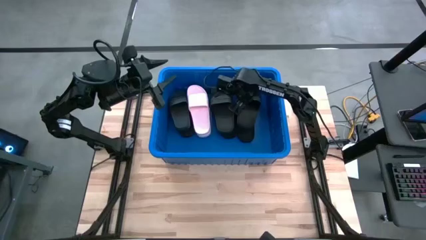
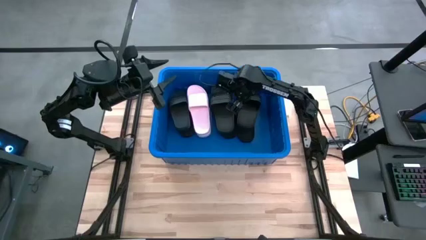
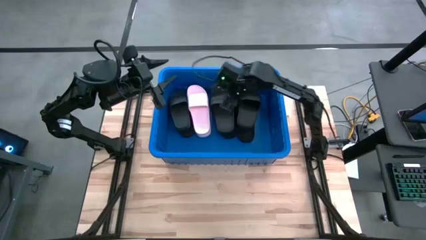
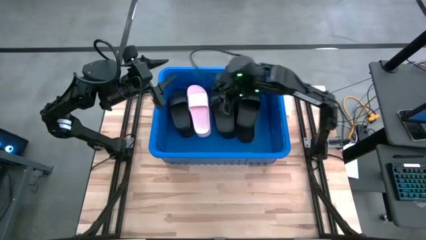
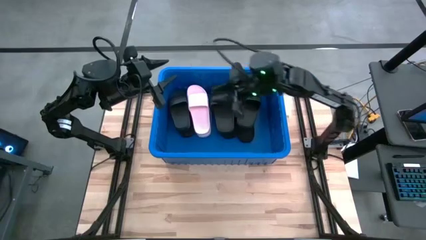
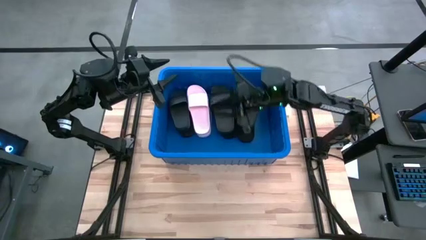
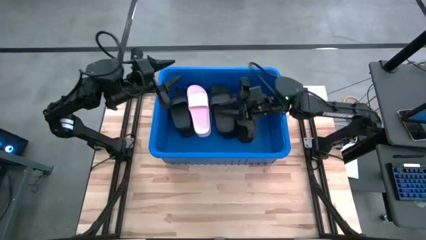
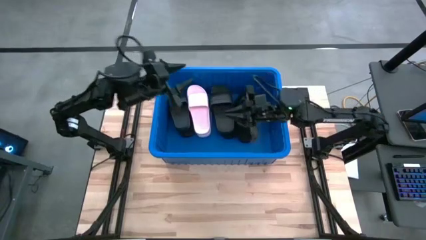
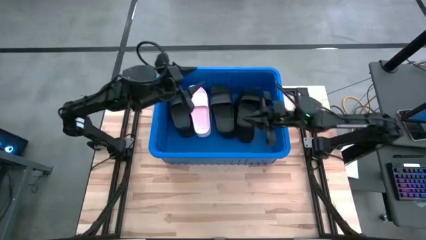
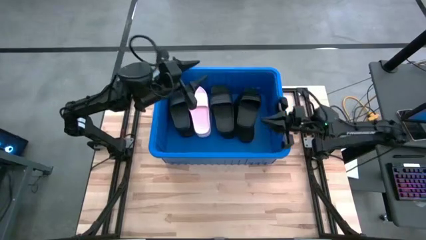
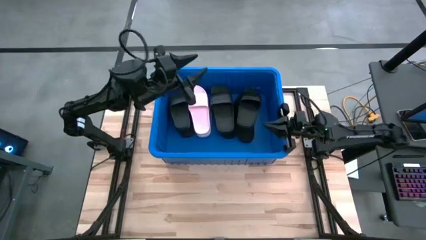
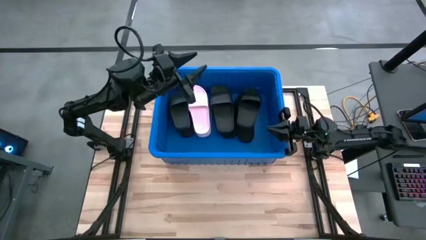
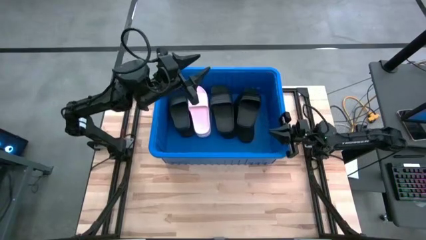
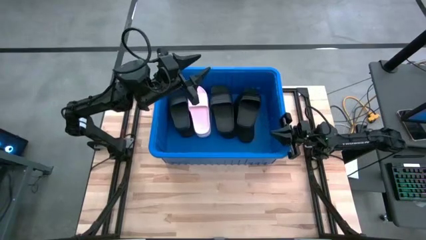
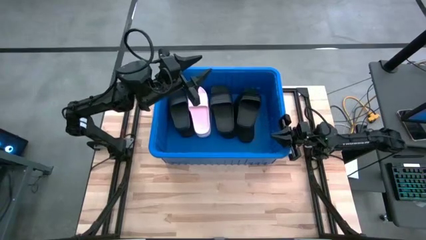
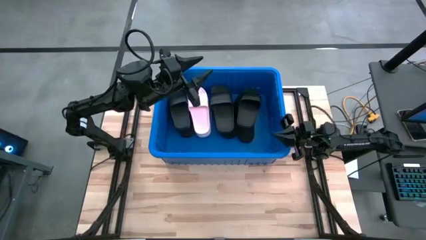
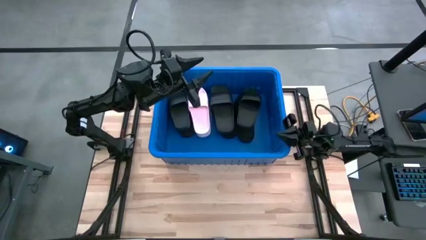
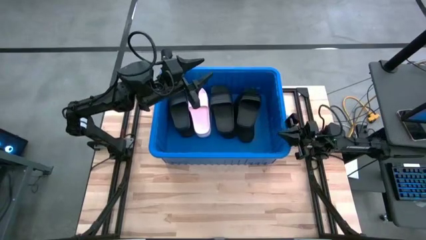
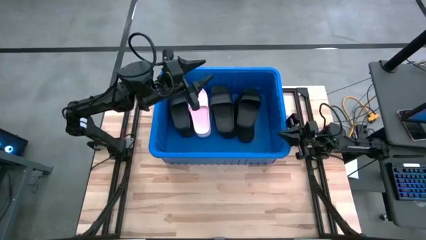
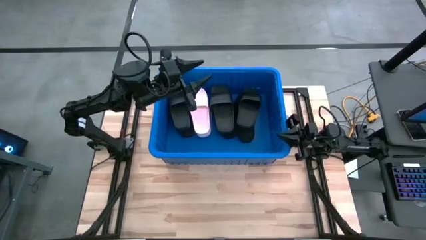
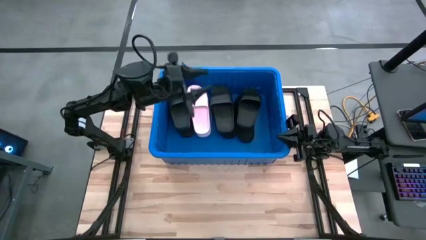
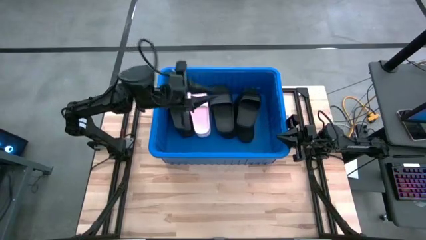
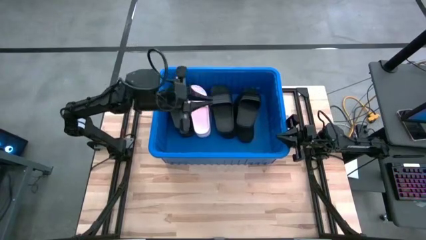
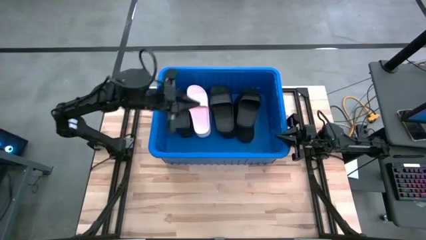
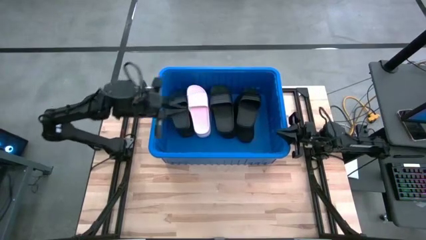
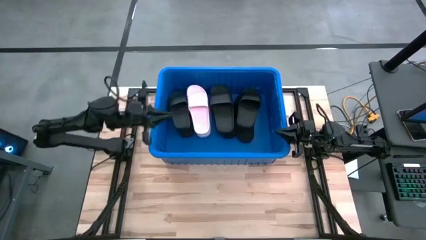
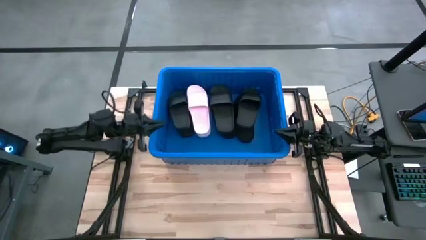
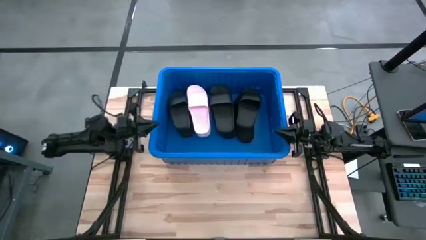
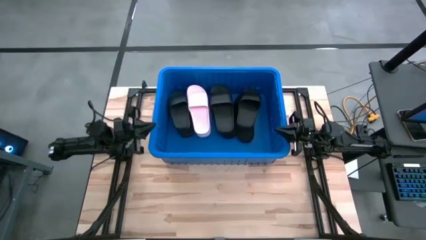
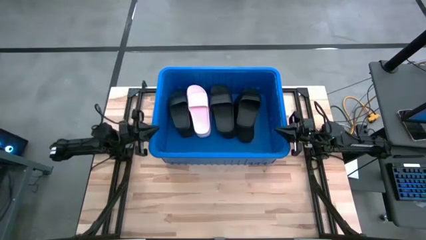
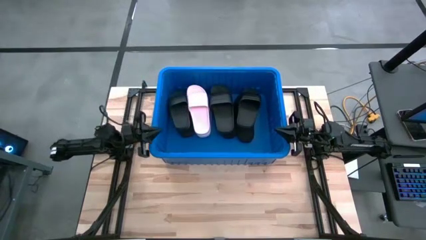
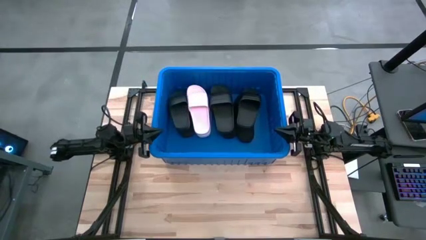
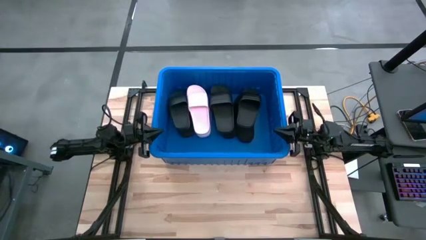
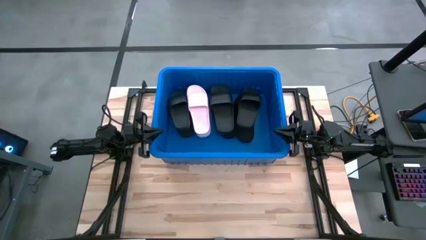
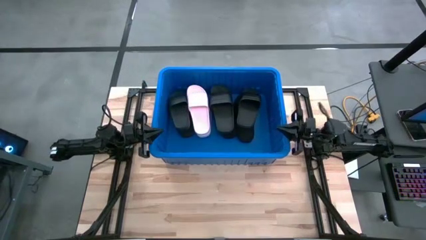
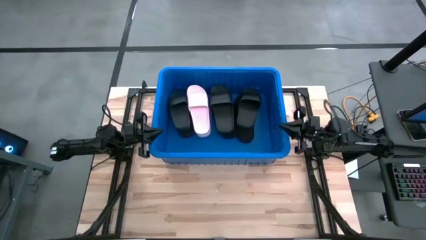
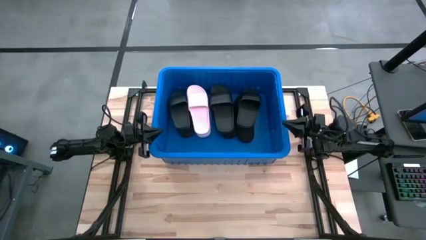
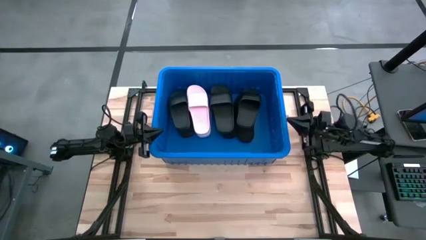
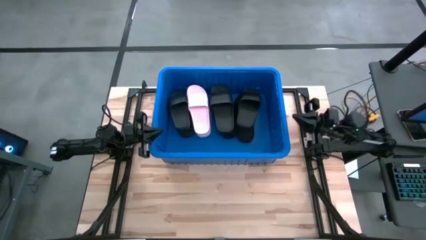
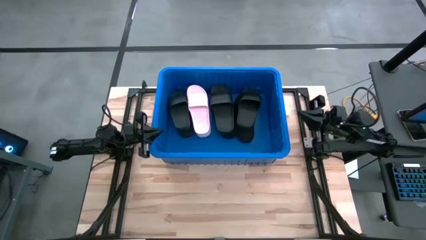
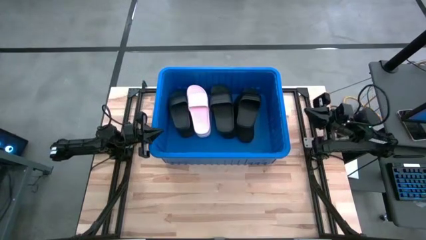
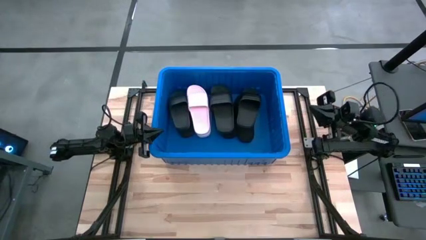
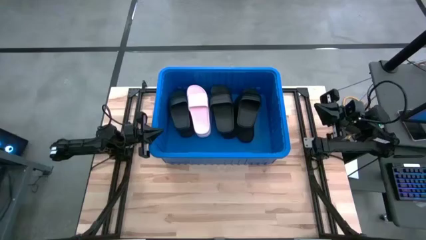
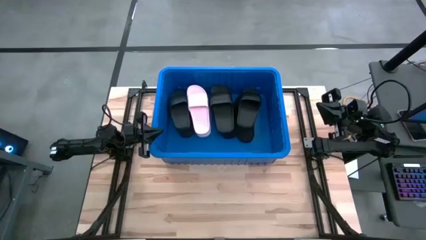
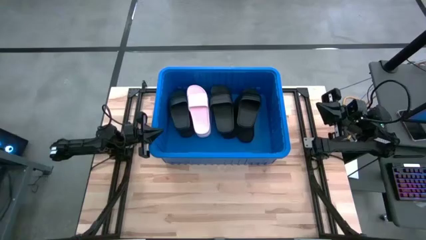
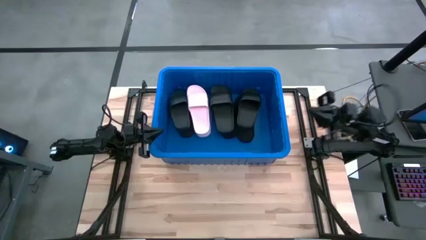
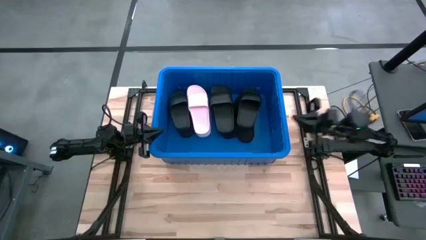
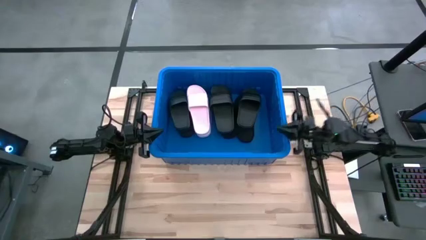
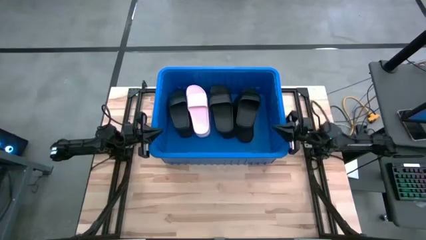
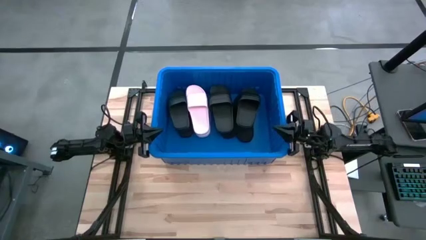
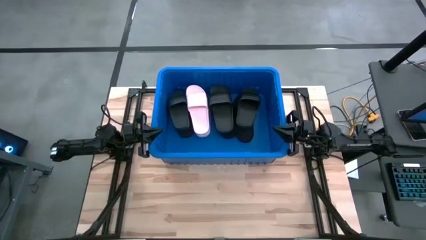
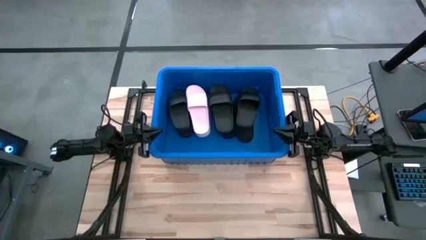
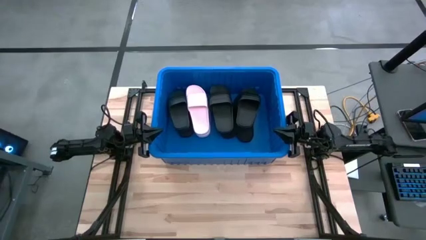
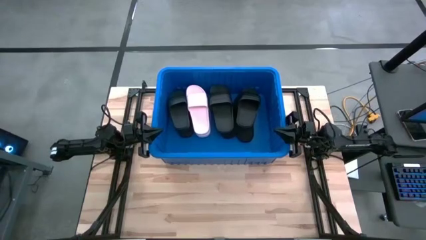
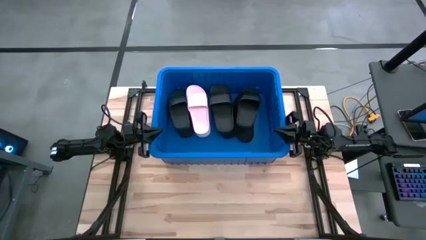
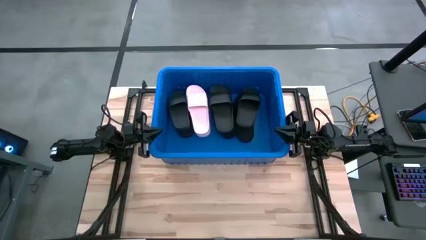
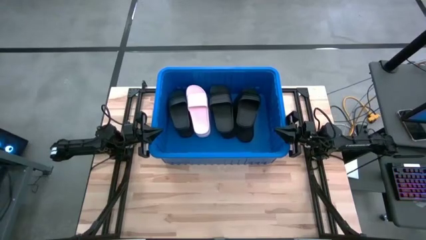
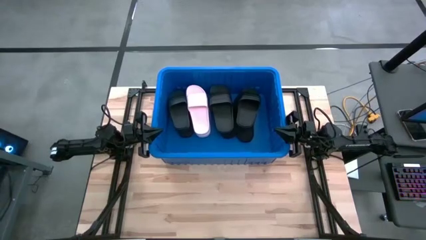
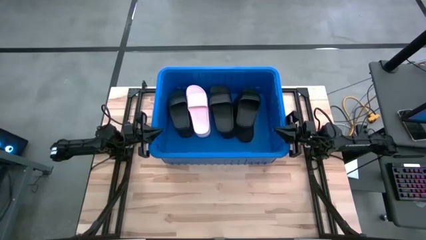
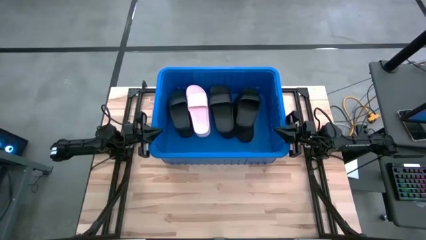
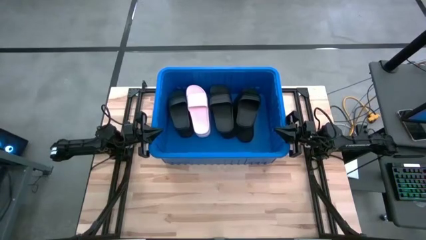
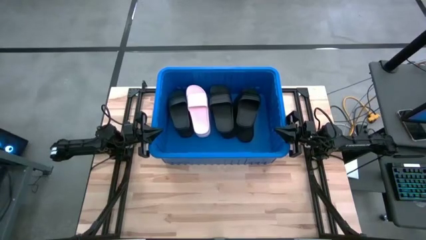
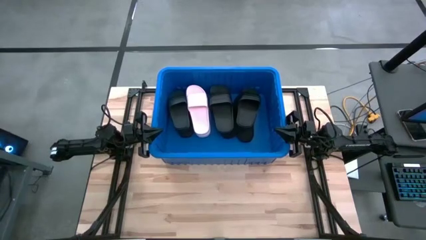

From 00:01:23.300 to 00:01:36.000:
Task: Pick and place slides into bin
Return to Home Position

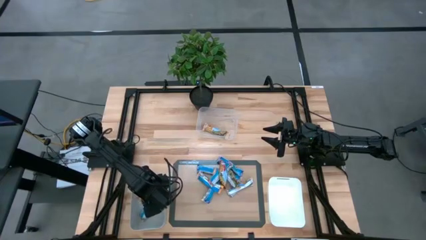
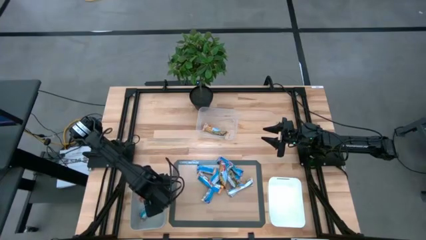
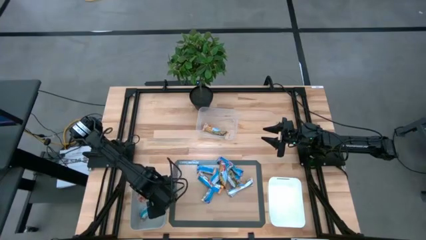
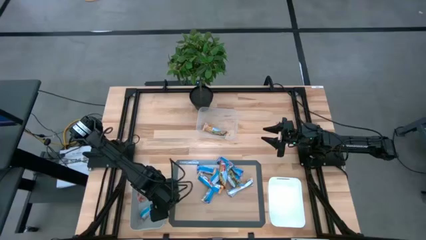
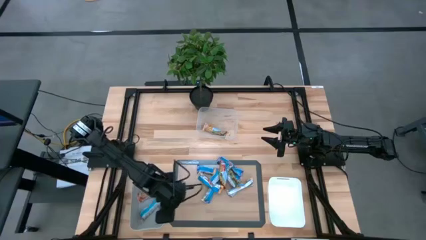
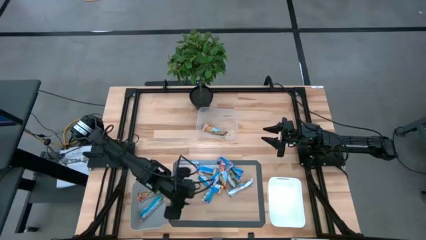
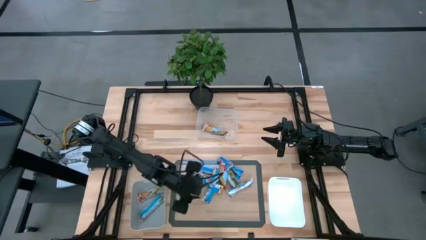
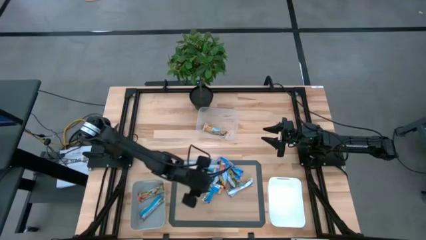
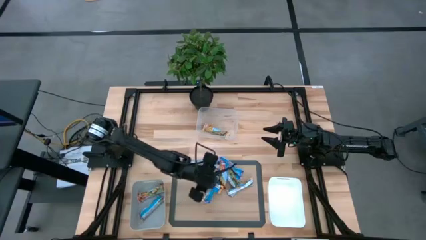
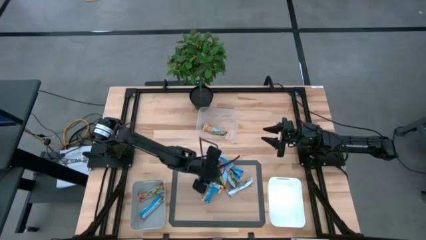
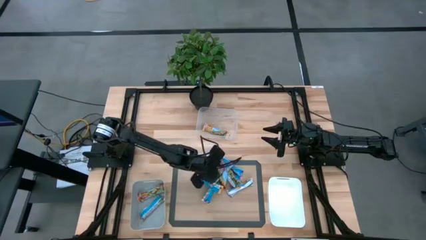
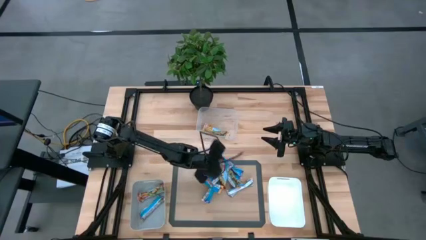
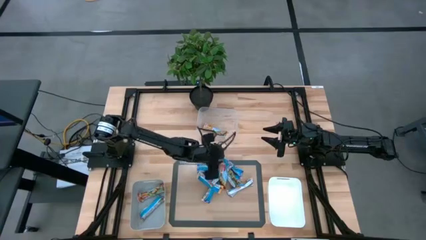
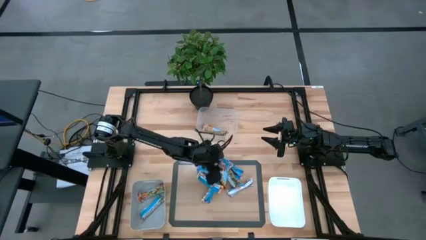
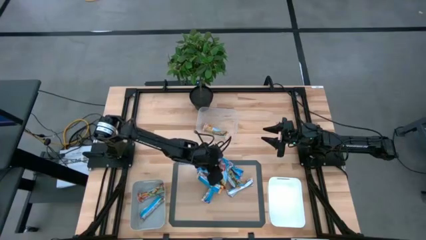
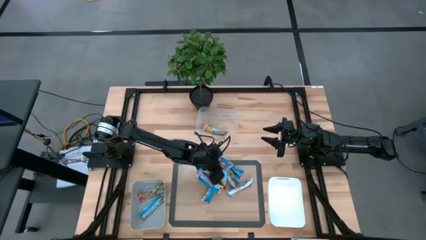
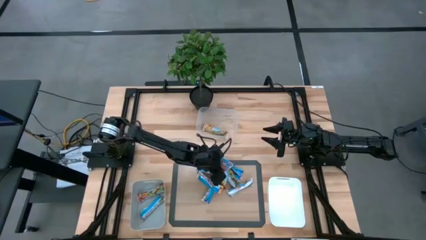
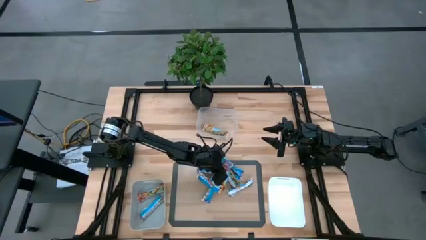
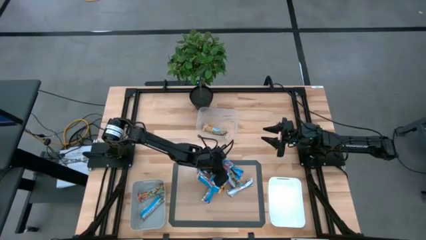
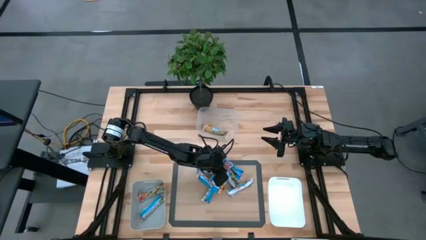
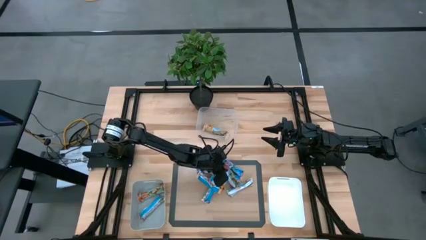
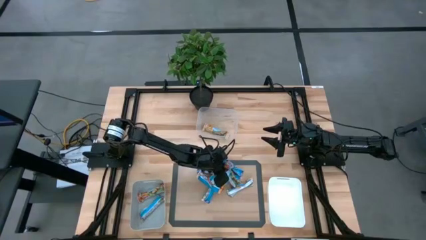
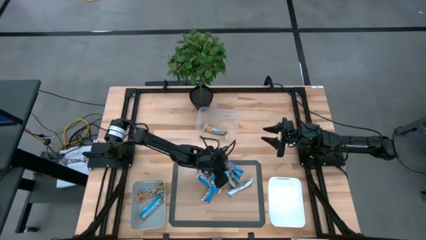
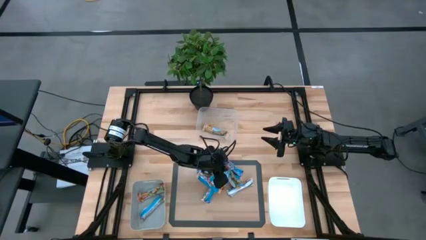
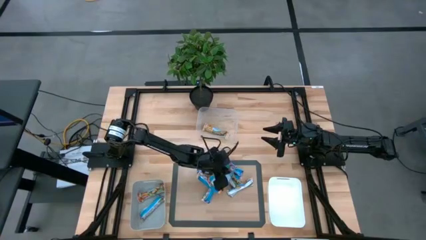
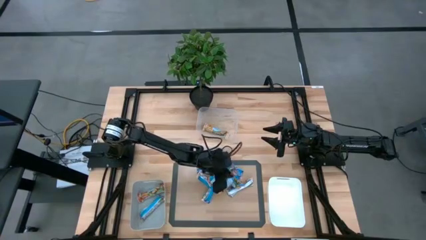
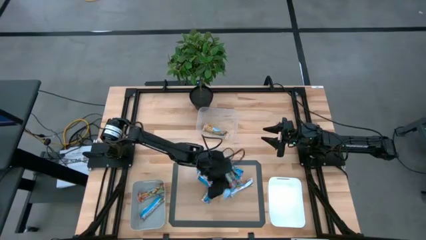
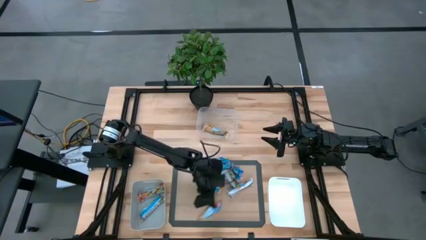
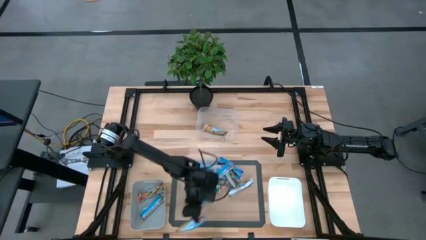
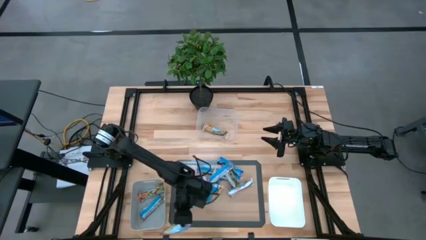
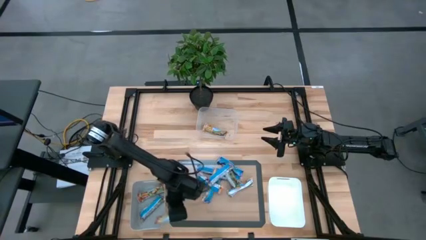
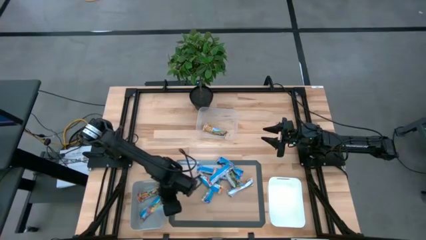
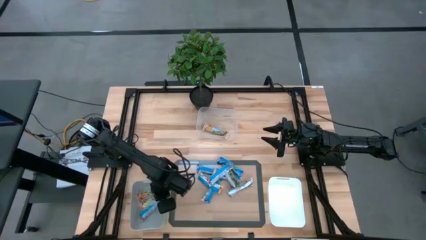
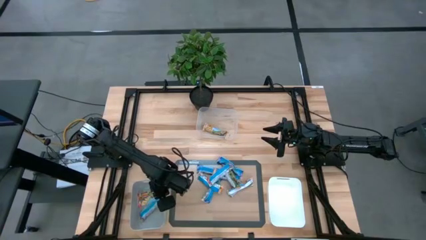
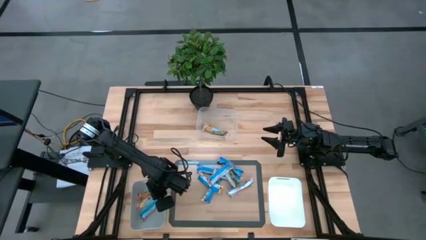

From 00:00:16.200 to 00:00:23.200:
Task: Pick and place Granola Bars by type
Put the red granola bar into the gray bin
